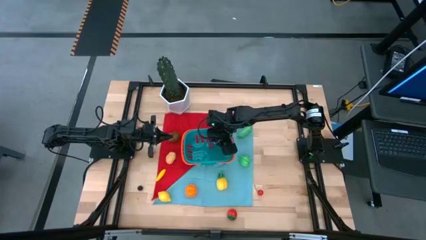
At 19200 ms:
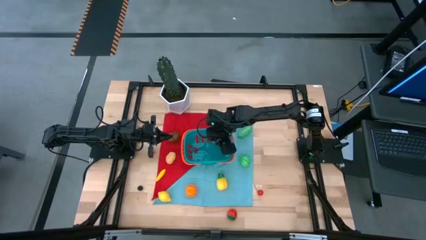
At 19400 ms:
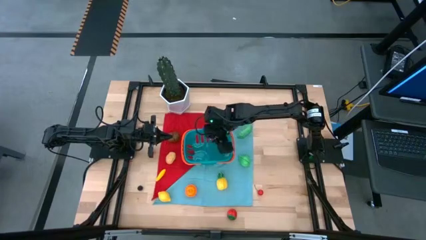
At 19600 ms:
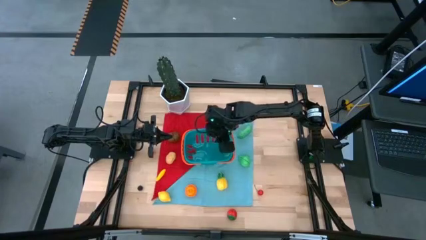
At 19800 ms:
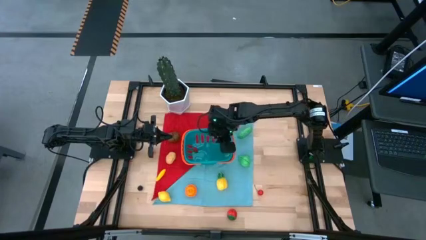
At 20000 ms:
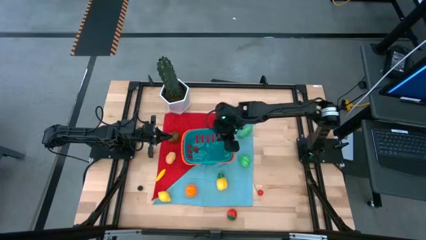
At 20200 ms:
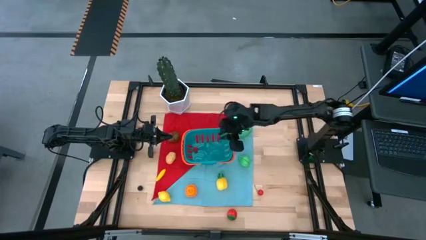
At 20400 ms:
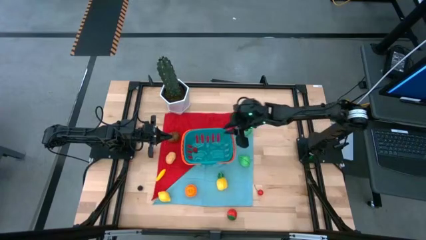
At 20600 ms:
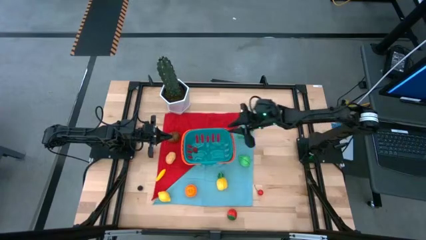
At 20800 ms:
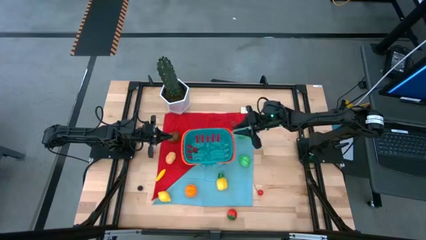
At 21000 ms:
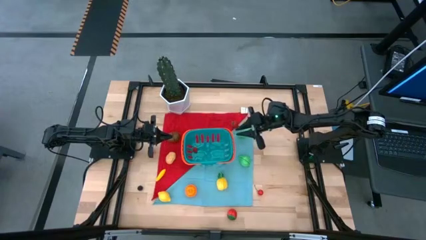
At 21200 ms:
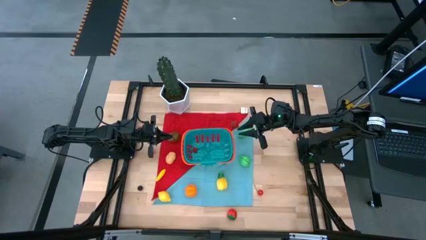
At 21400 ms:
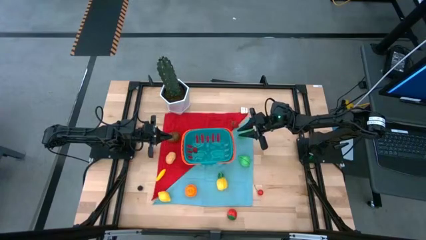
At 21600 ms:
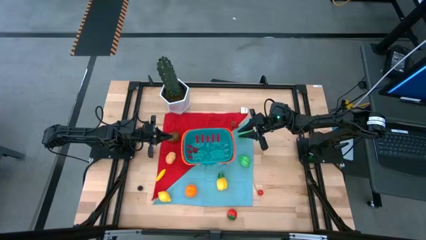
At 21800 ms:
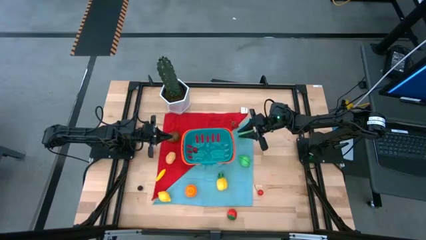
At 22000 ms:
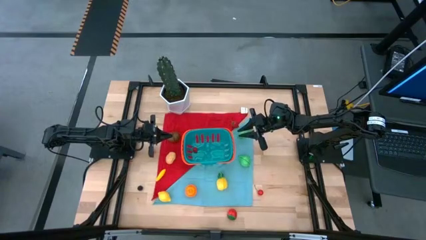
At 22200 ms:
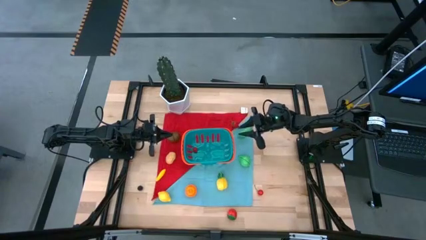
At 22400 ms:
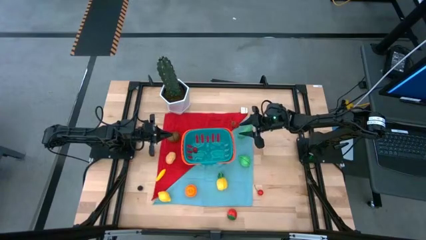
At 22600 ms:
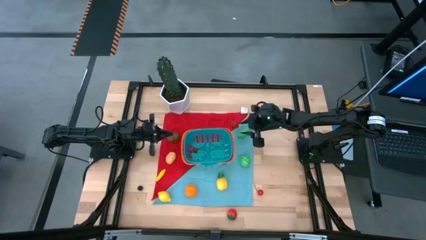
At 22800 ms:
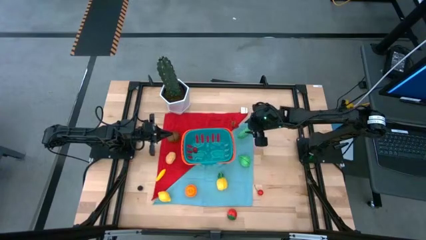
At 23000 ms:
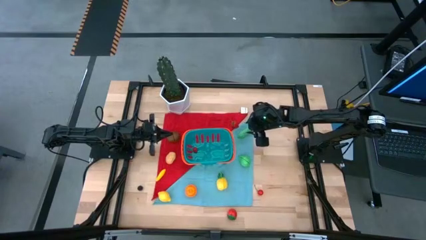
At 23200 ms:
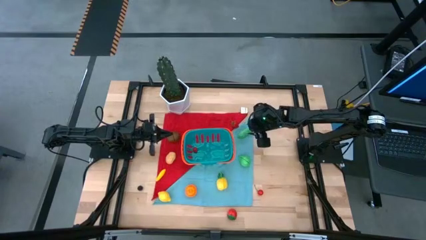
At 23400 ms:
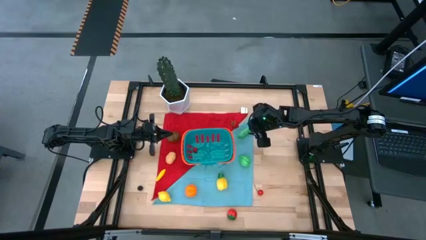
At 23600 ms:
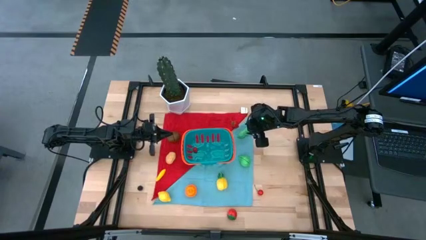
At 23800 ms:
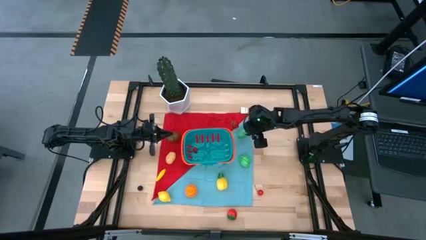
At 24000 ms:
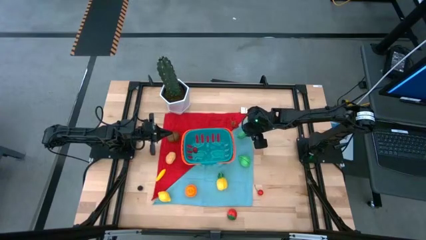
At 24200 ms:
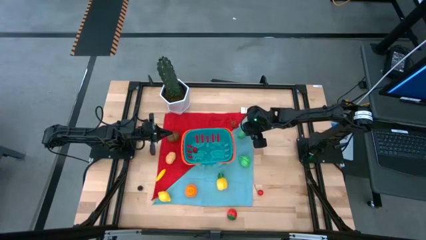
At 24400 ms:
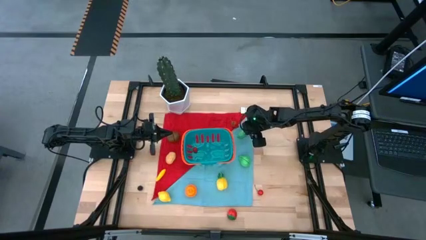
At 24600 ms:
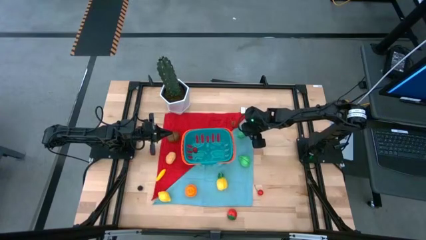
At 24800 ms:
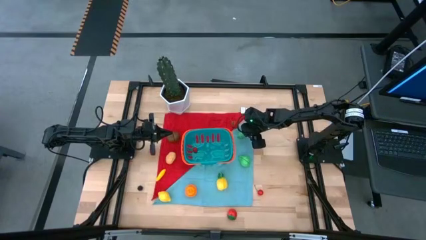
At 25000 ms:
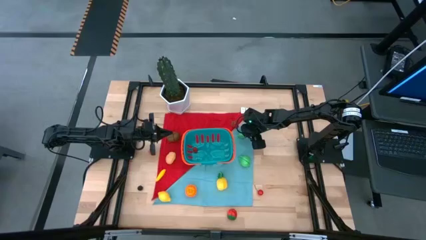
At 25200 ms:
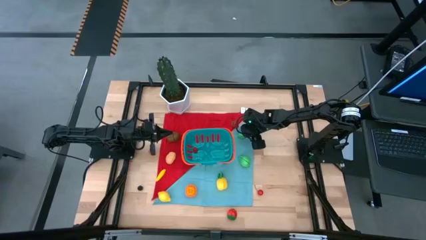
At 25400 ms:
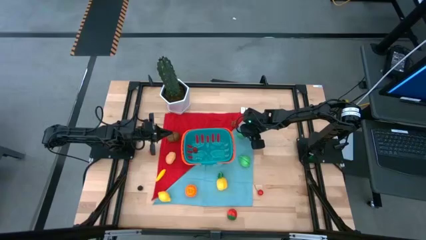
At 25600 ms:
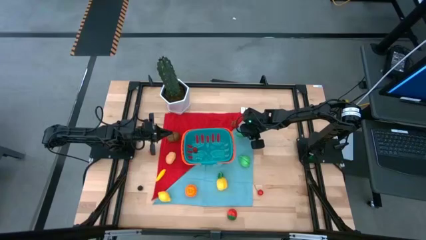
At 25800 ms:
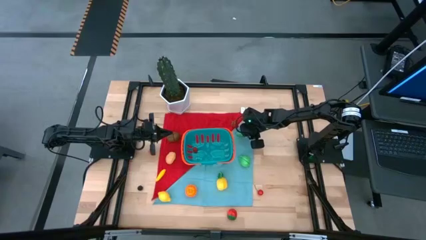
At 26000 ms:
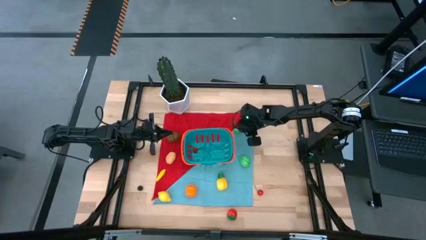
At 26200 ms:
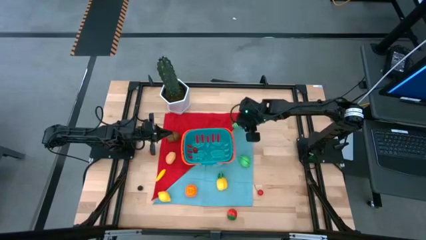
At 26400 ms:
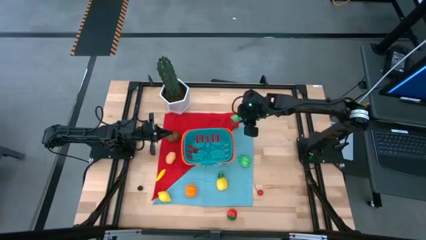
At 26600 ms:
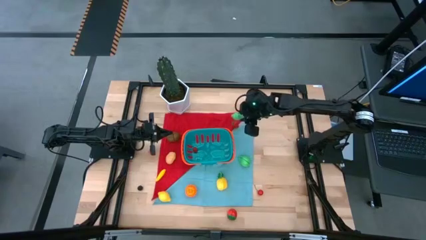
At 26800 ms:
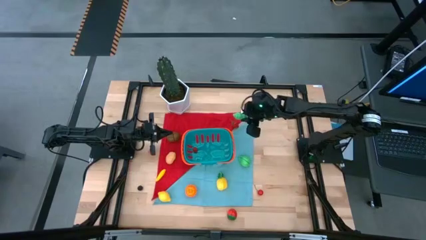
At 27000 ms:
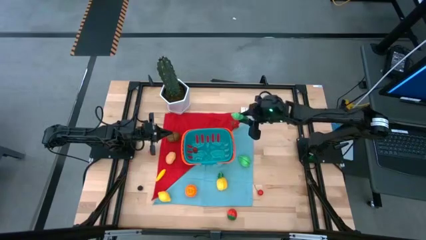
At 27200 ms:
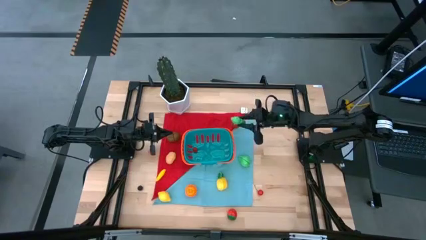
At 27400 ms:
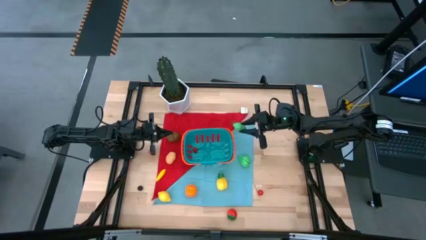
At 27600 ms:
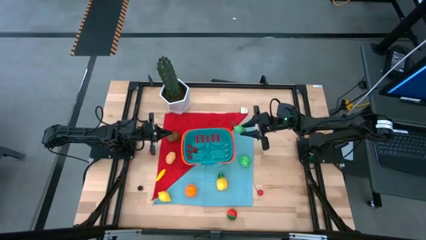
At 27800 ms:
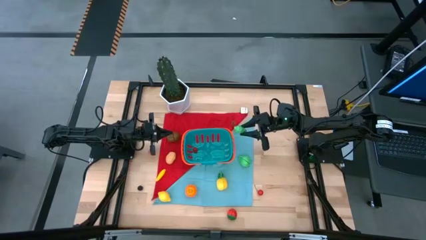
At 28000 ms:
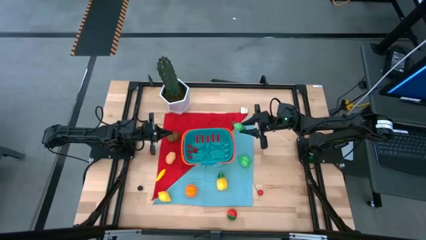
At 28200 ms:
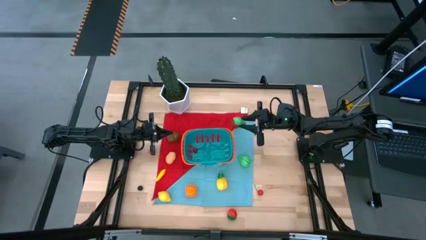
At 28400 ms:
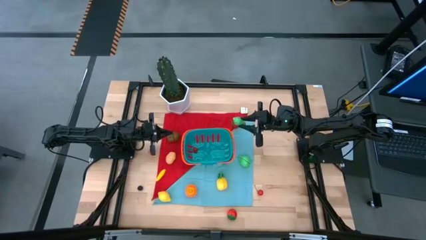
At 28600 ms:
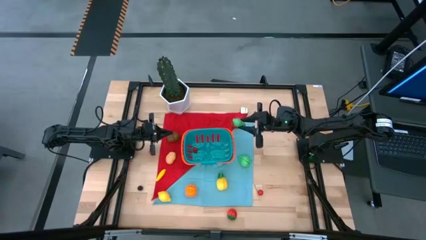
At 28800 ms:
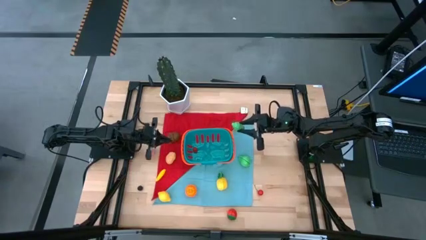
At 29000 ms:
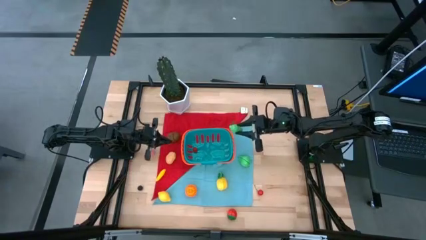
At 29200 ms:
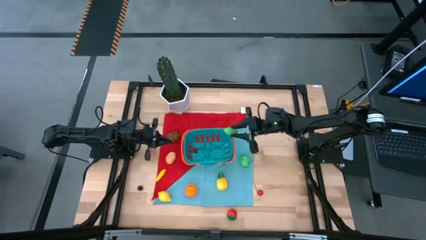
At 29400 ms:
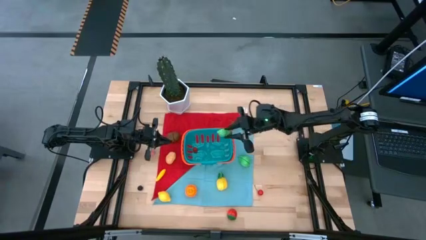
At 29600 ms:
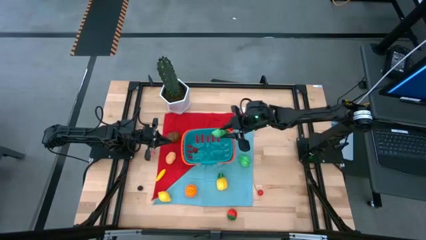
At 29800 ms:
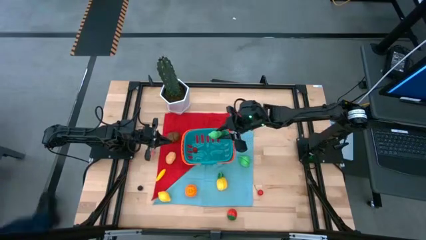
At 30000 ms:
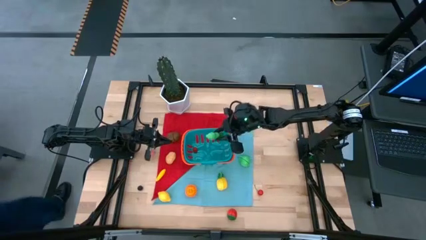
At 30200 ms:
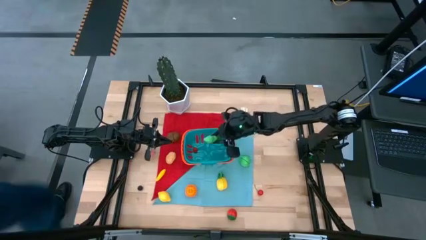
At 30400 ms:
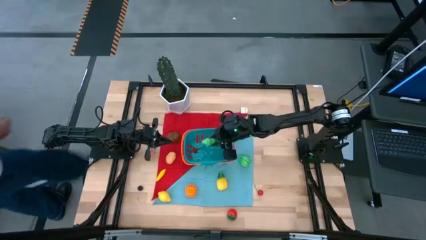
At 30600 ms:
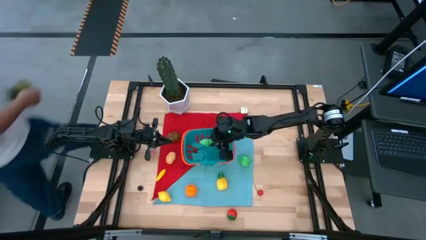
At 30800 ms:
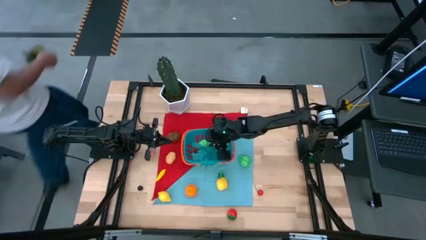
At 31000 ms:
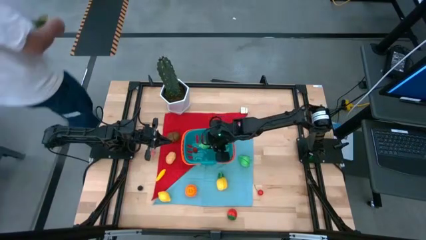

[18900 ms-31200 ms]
Task: Build produce basket
Put the green eggplant into the blue basket
